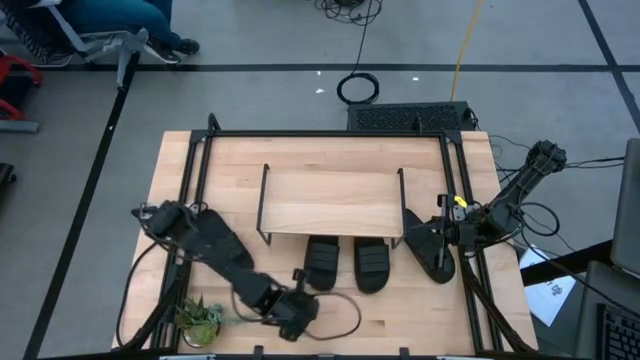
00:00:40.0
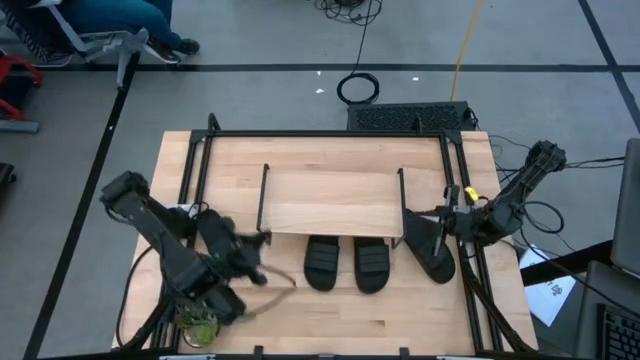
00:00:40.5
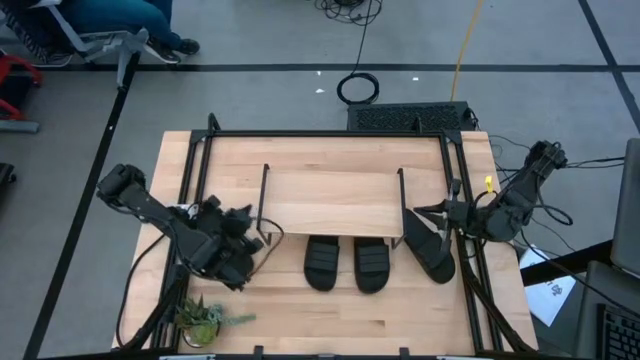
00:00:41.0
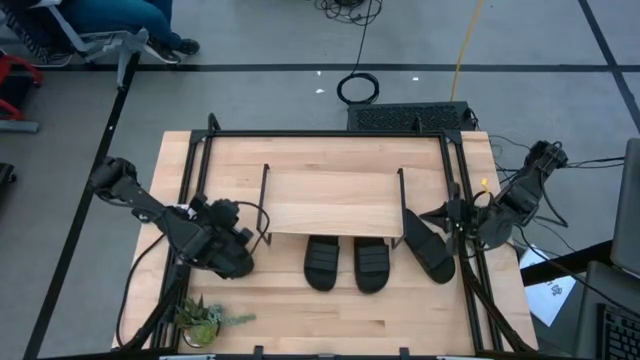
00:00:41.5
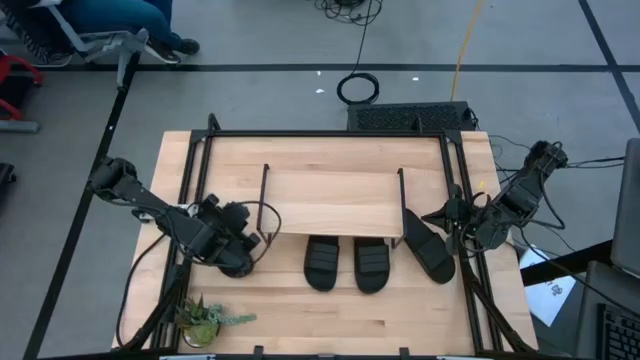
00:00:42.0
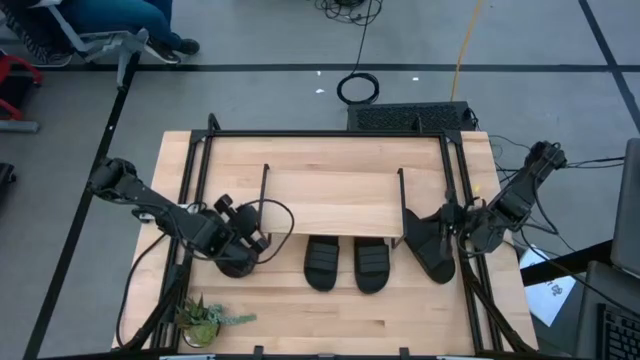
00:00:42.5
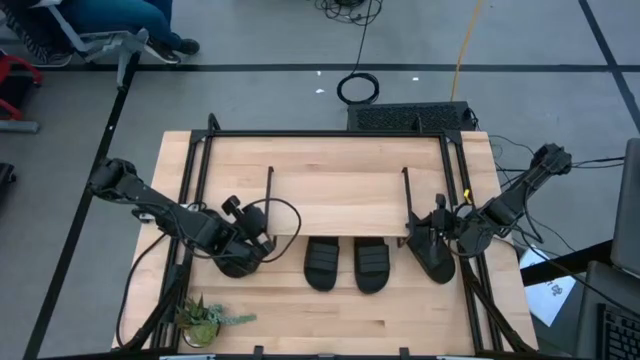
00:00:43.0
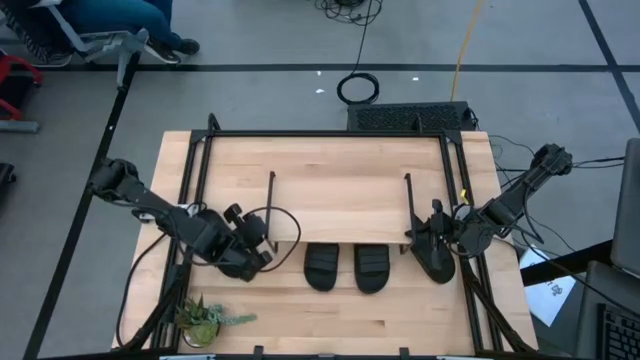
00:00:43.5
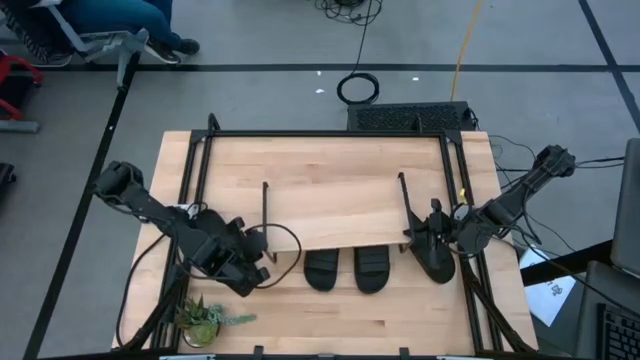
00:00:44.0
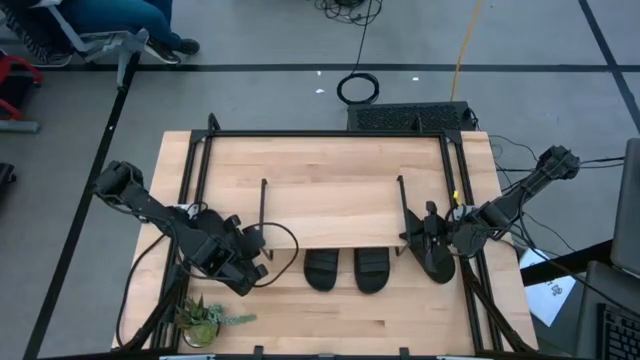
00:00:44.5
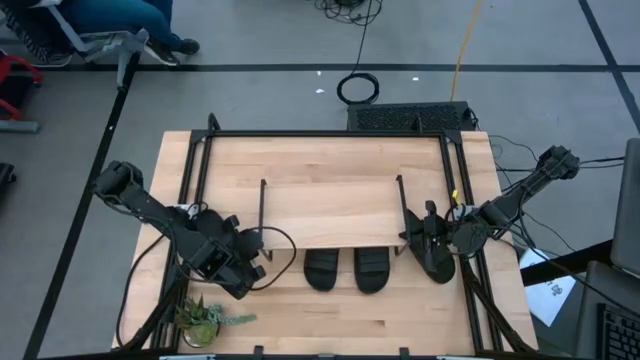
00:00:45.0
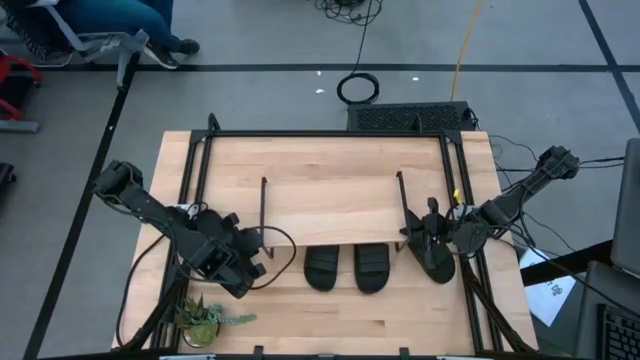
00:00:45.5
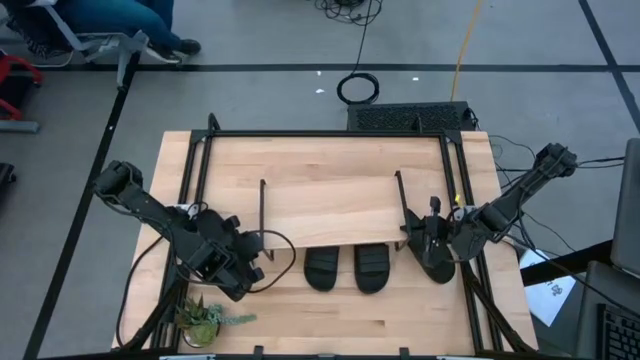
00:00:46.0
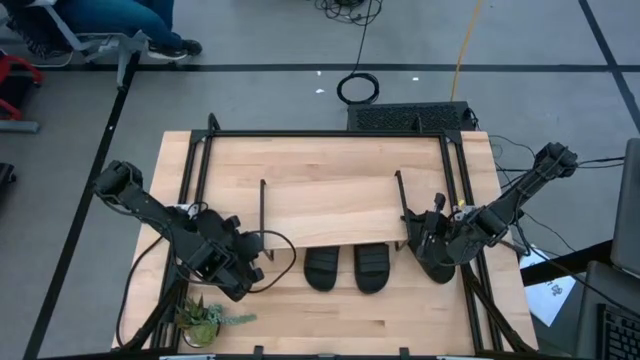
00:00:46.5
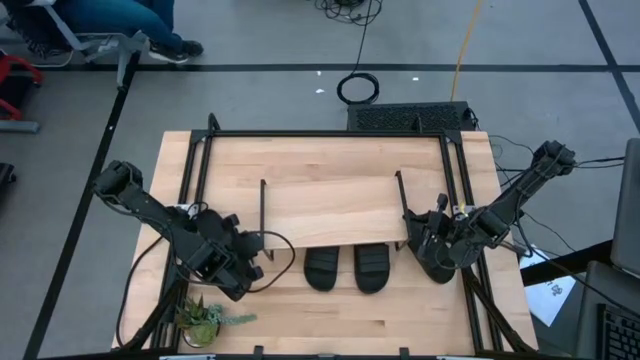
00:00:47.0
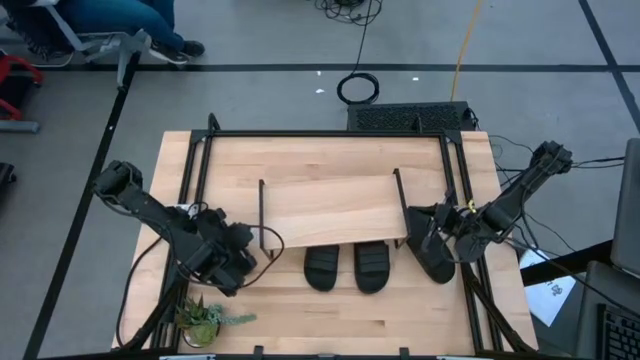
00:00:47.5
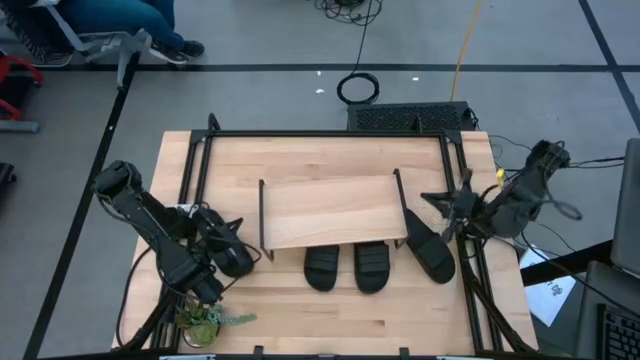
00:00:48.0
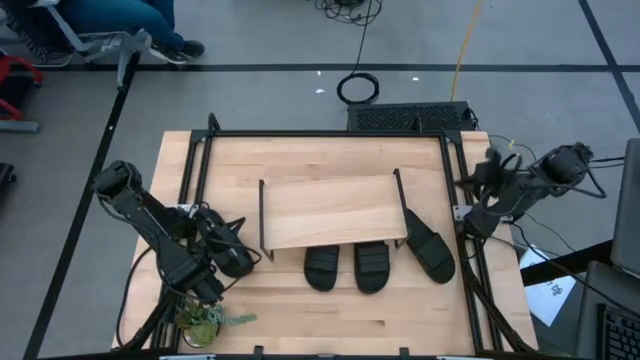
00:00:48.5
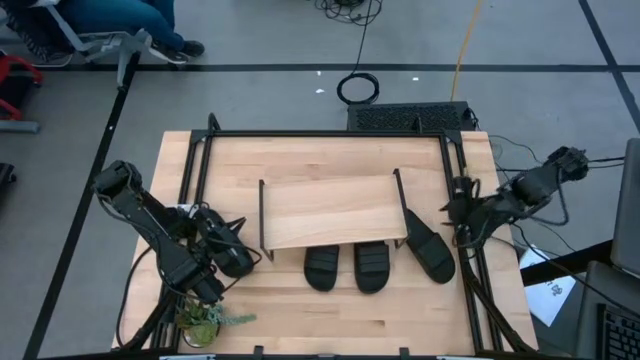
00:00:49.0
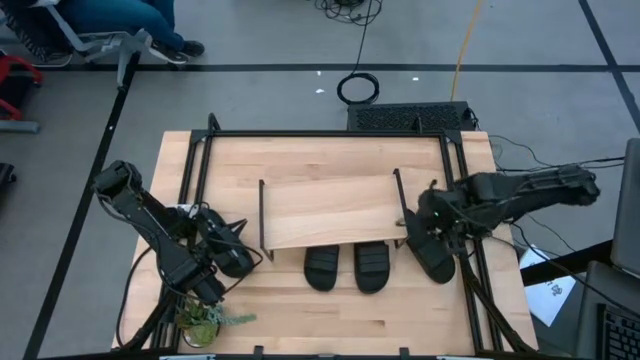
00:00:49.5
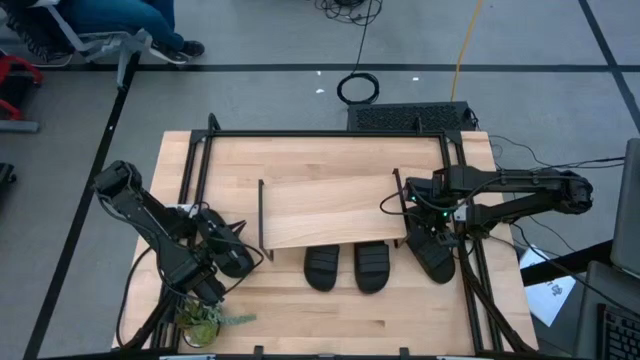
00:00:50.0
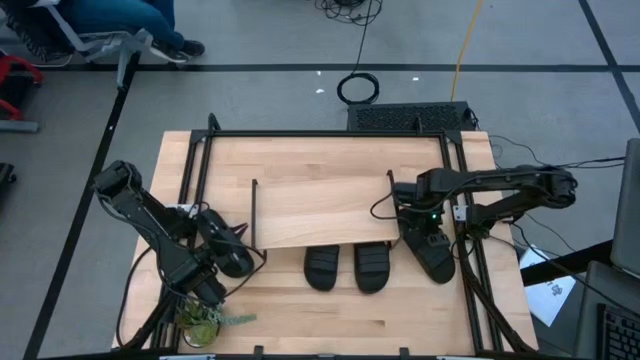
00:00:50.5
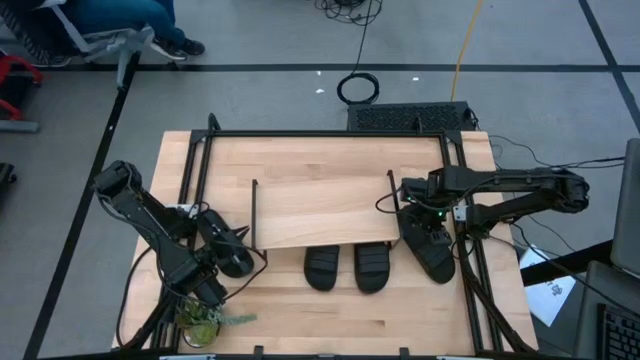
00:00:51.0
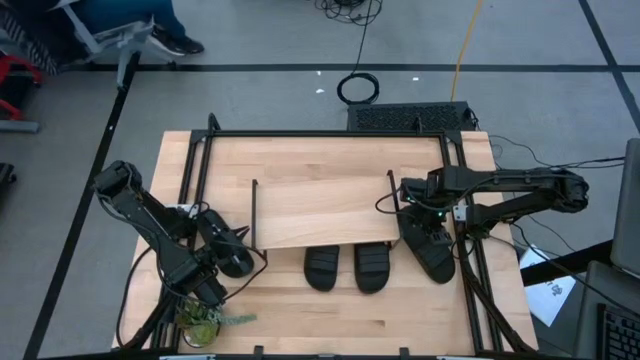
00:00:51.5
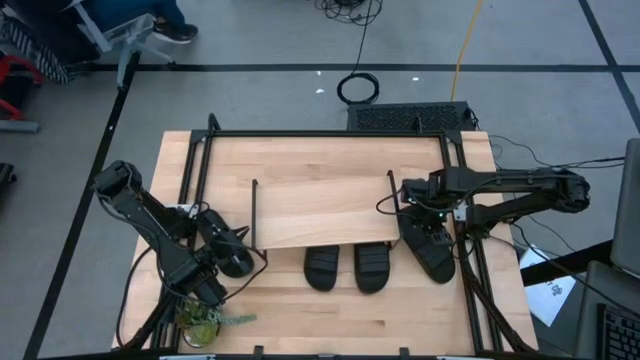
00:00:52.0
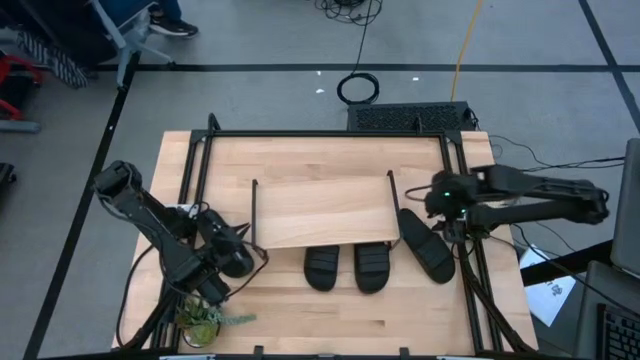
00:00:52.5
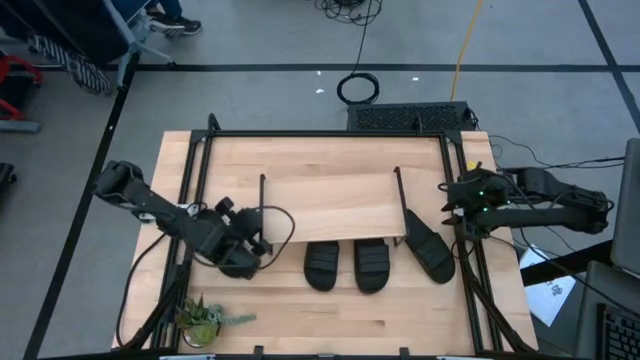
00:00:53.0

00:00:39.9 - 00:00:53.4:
Task: Pick and place slides into the shelf
Adjust the shelf

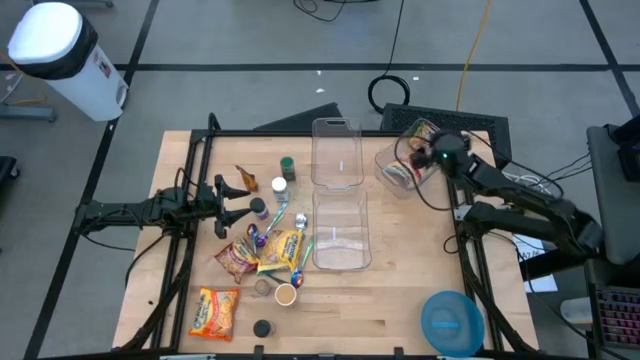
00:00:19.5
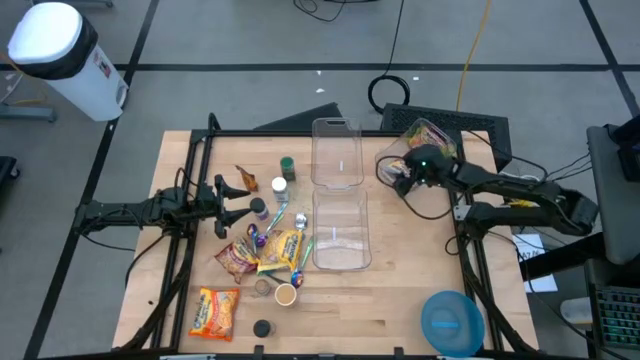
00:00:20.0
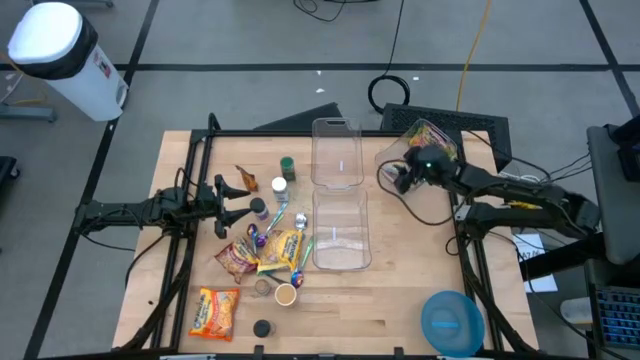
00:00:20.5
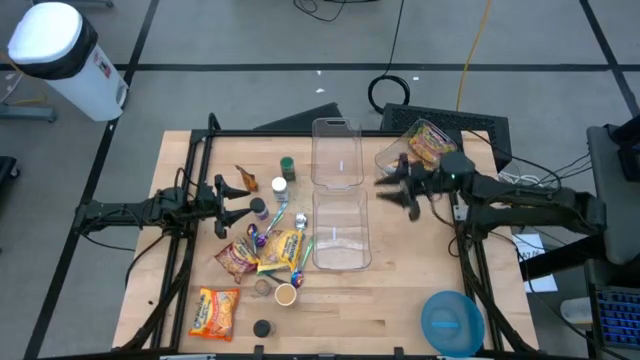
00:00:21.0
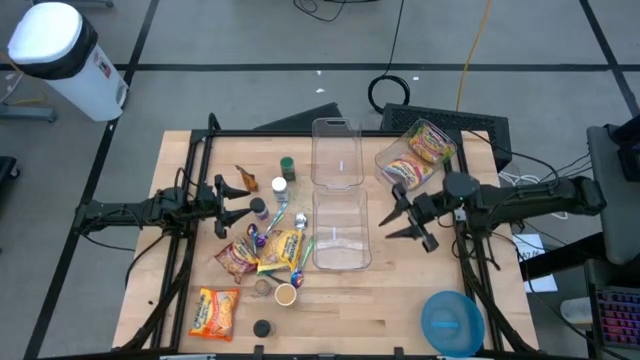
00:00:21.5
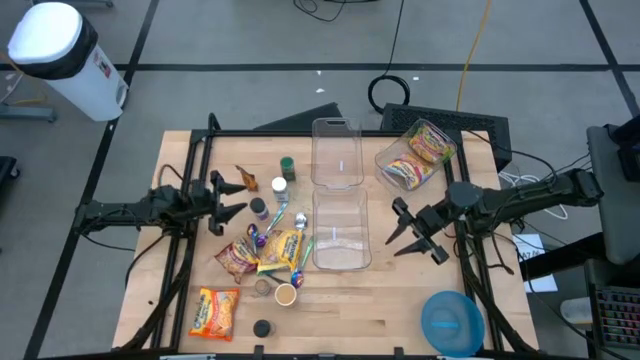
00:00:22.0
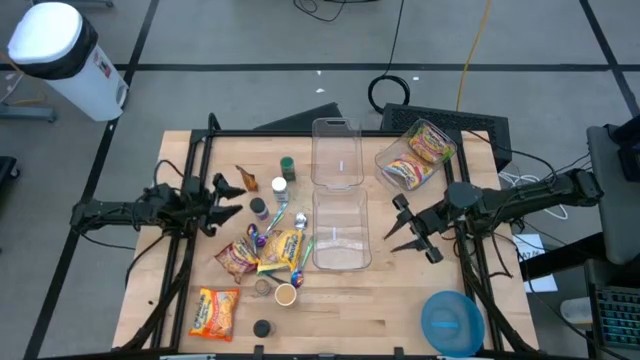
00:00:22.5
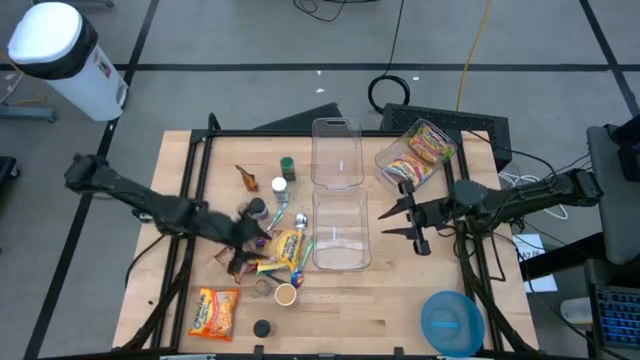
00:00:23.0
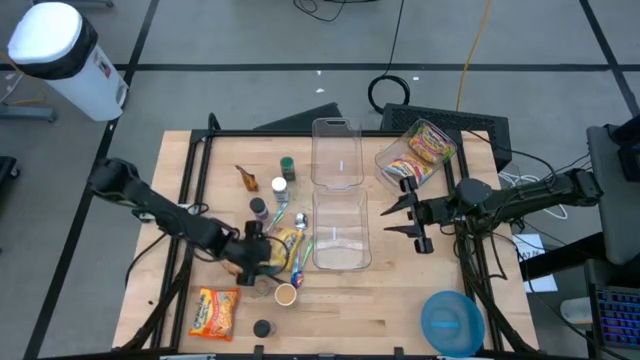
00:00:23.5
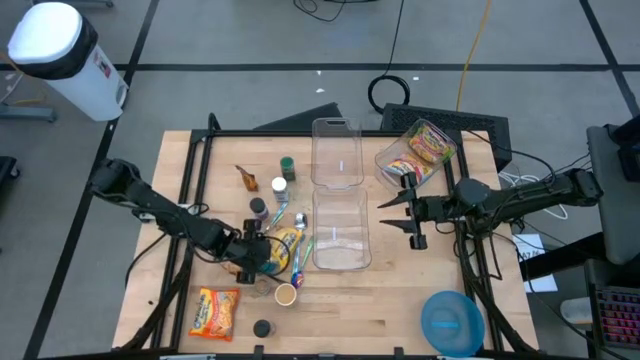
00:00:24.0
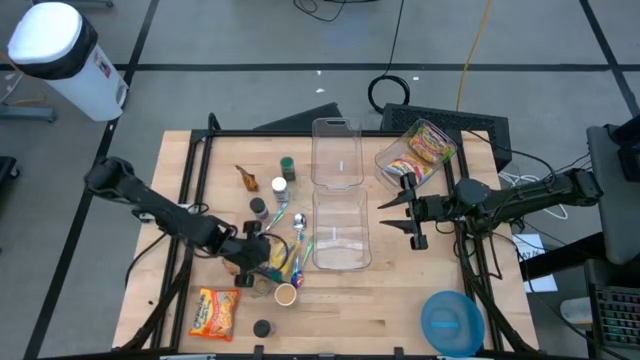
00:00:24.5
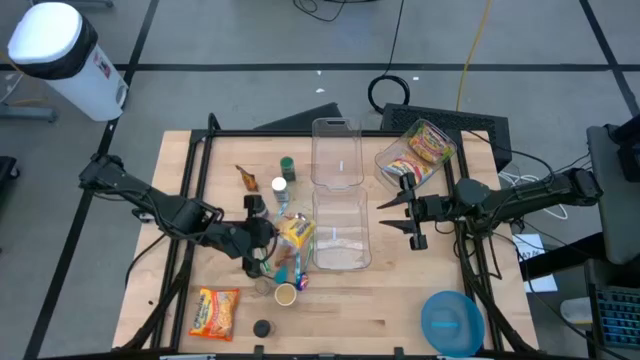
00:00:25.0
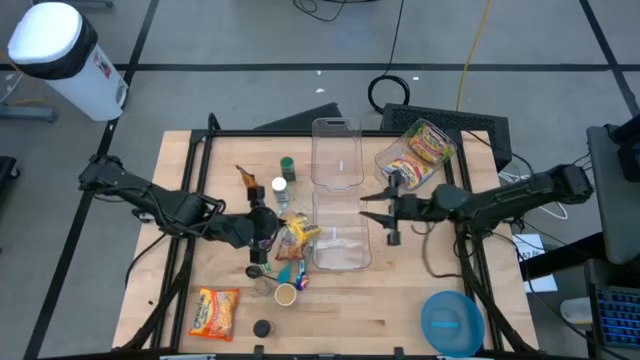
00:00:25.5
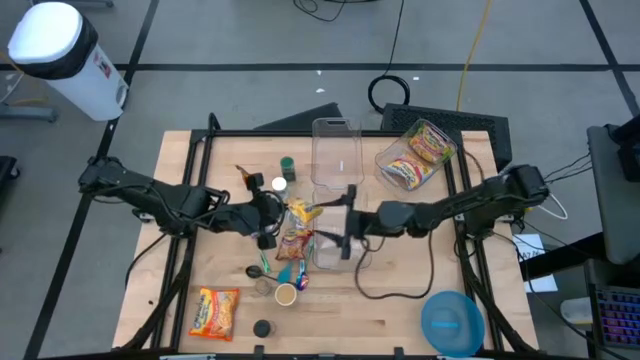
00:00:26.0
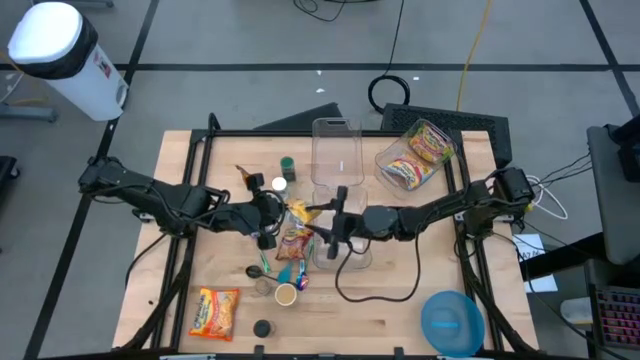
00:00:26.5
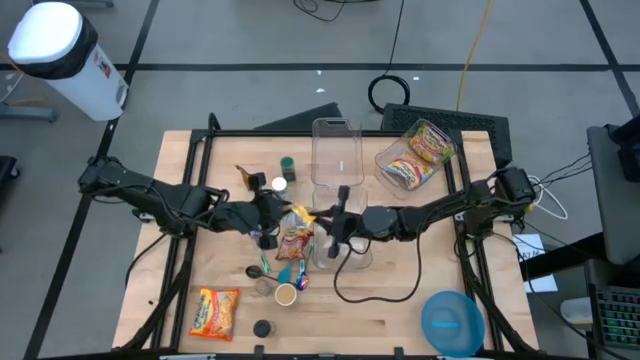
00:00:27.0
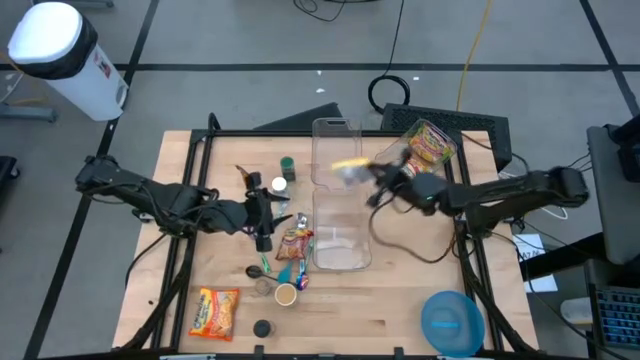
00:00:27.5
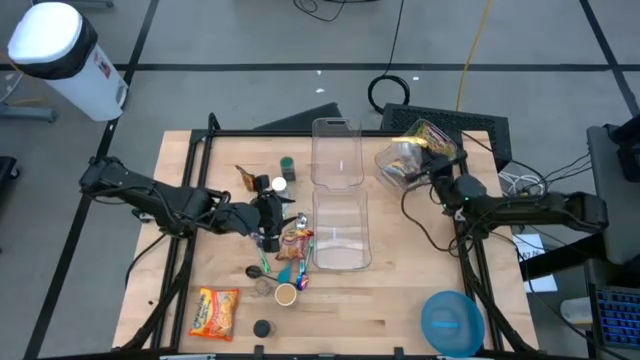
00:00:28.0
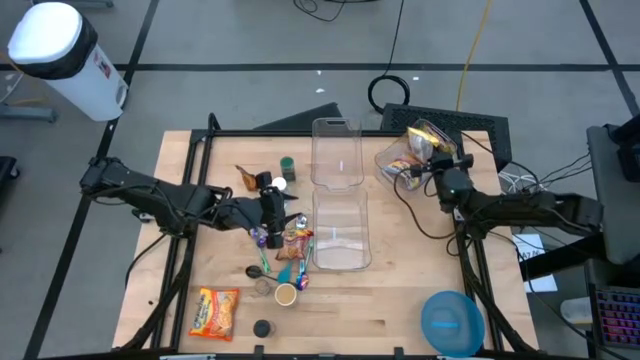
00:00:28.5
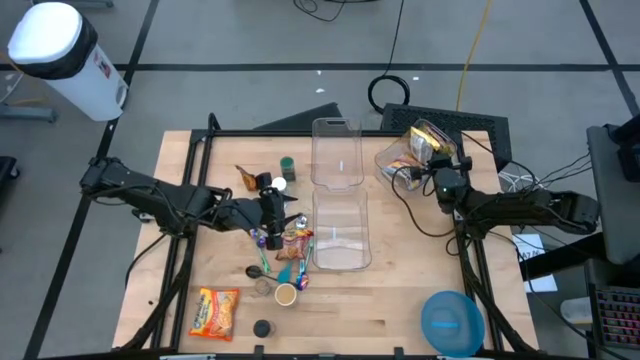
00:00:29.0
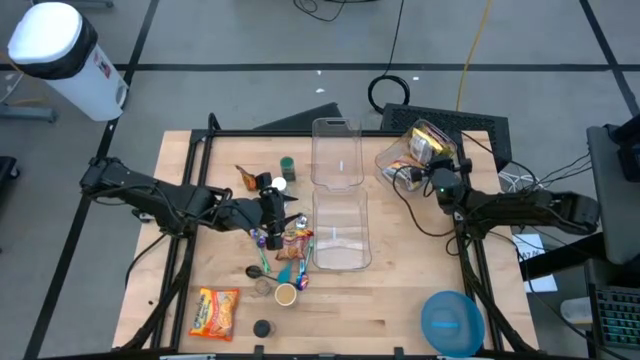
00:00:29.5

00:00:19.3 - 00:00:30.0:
Task: Pick & Place Food Item
Put the yellow noodle pack into the top right transparent bin
